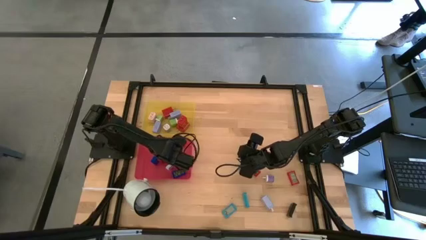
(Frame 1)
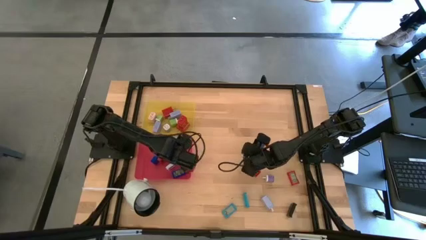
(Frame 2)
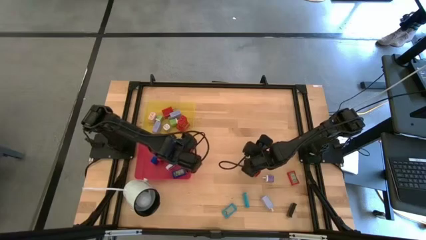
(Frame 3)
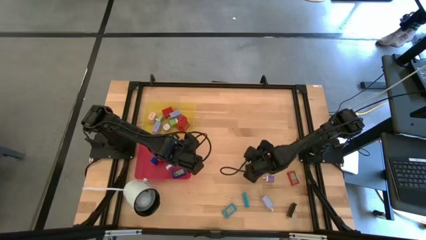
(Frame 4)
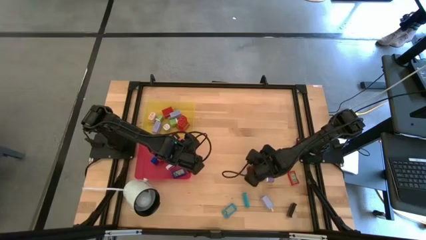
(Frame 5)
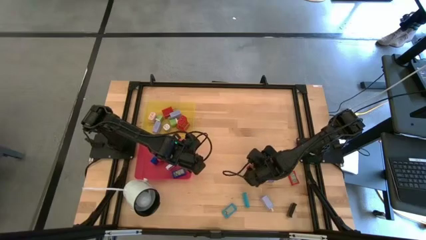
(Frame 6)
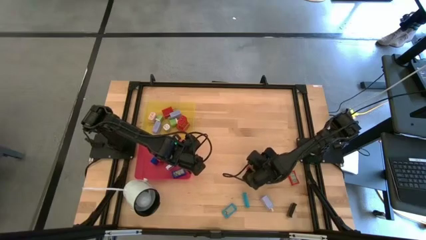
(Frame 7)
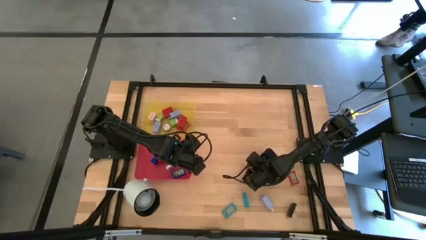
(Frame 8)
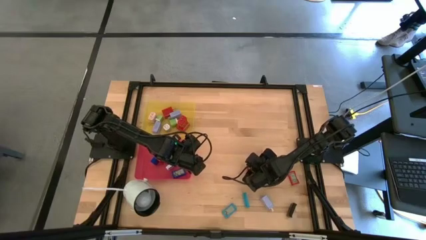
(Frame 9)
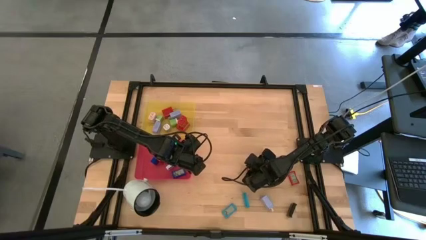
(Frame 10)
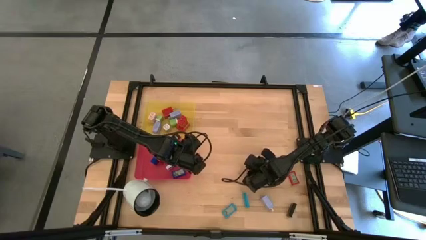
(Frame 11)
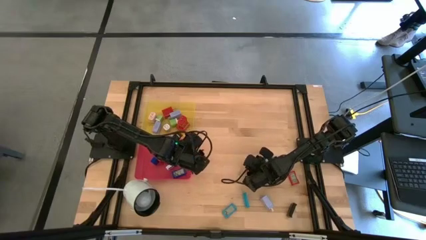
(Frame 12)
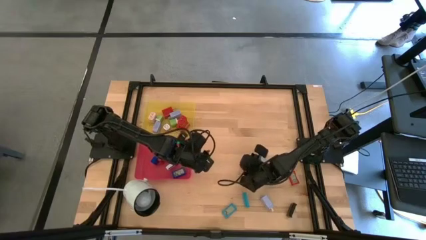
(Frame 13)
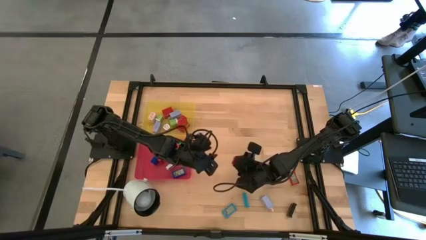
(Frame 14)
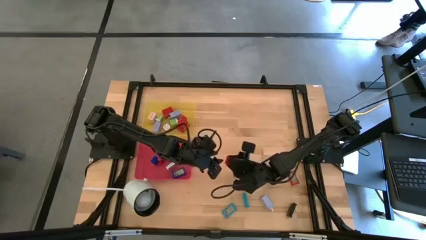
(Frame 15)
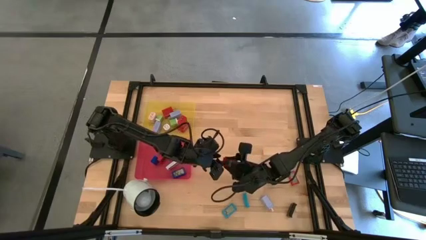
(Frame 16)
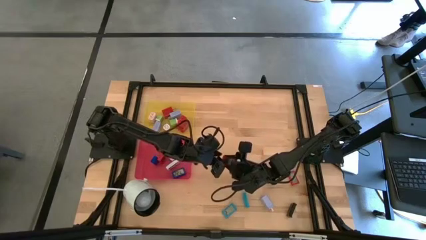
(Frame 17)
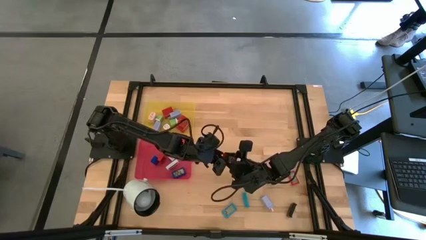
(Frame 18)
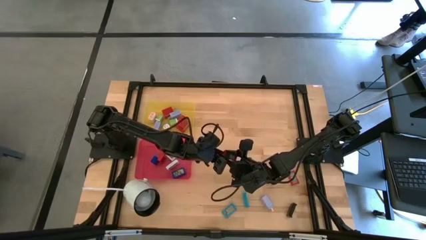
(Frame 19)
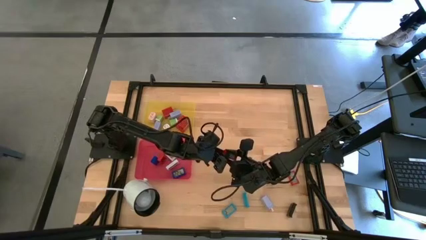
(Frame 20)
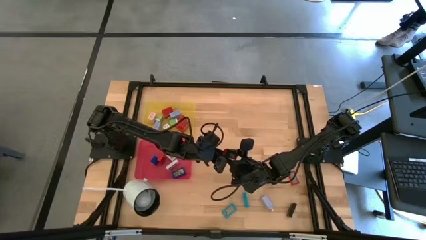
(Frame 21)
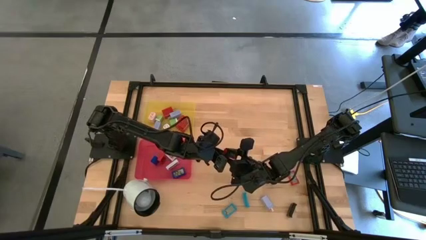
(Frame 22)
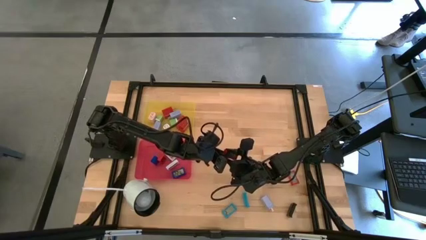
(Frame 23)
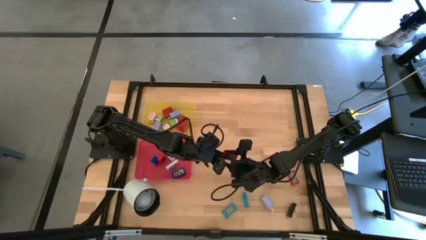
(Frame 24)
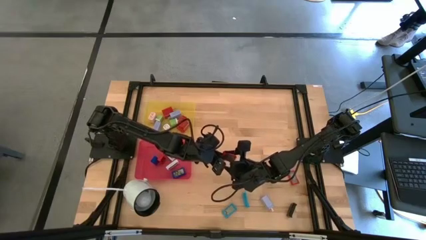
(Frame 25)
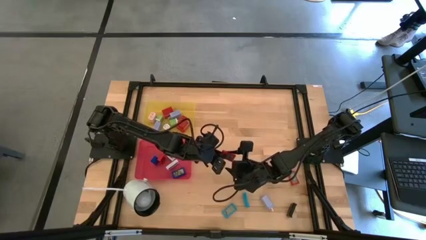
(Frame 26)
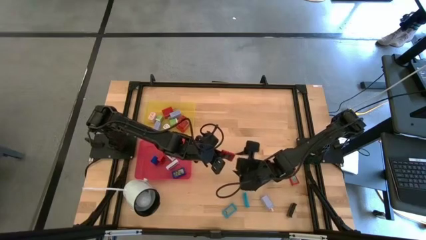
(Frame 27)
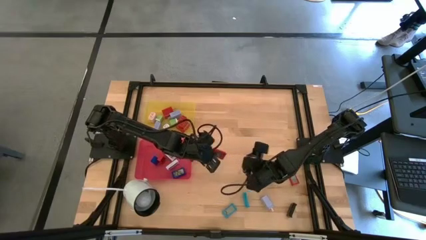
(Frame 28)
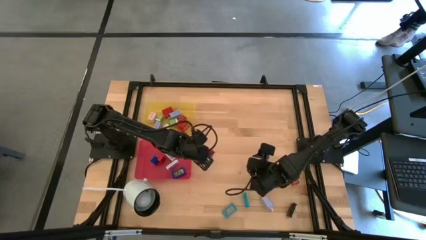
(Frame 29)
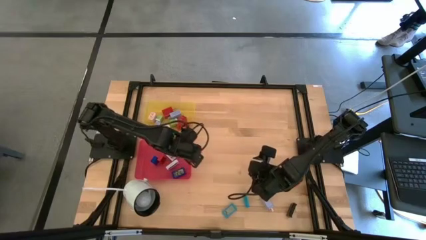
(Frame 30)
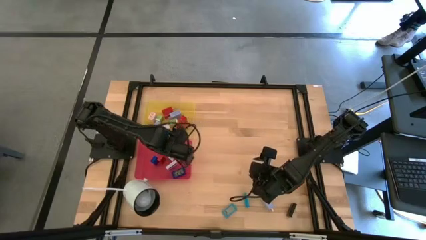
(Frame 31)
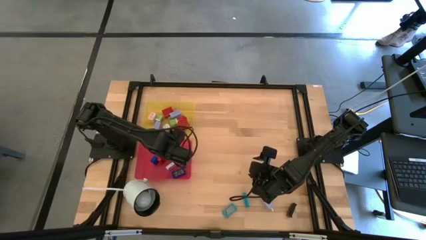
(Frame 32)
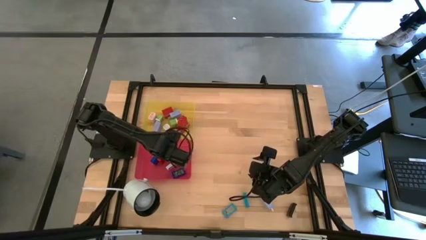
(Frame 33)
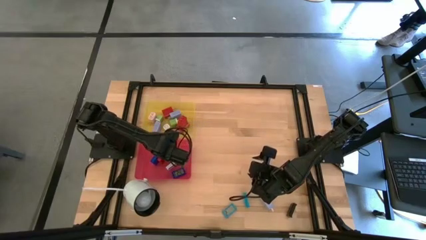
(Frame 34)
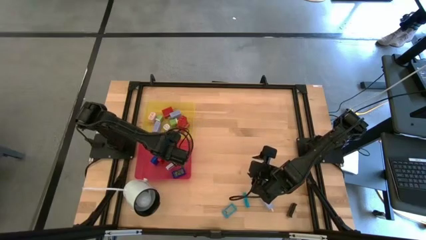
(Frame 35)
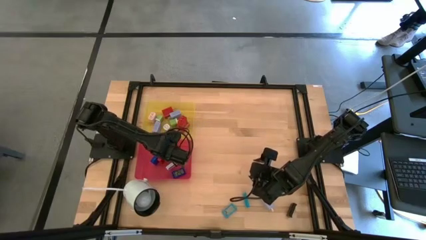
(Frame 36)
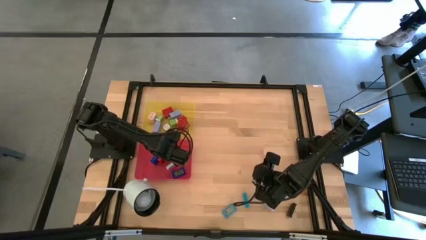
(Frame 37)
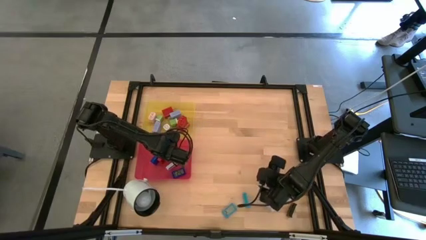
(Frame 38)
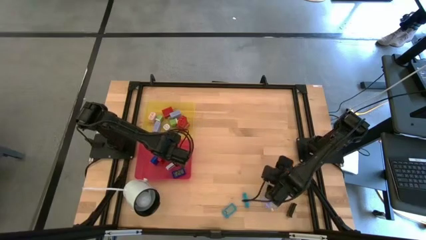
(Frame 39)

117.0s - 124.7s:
Task: Pick & Place Office items
Put the red timer into the red bin

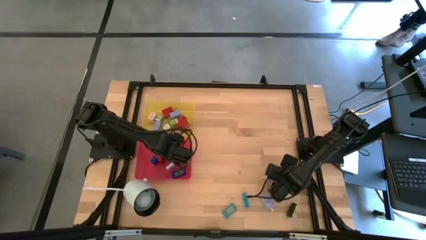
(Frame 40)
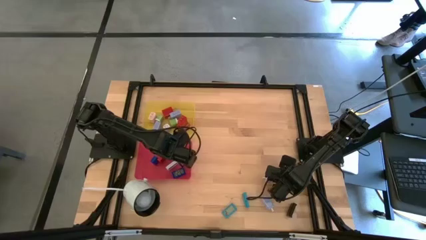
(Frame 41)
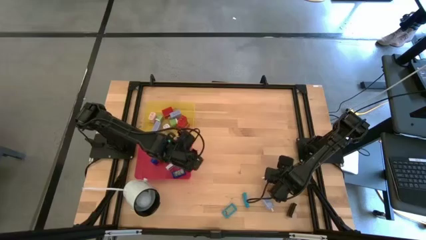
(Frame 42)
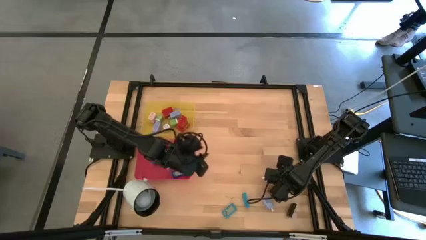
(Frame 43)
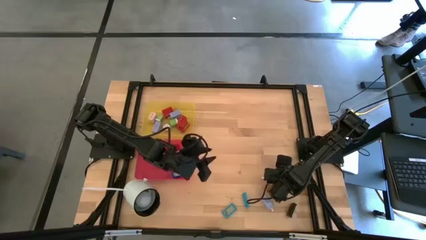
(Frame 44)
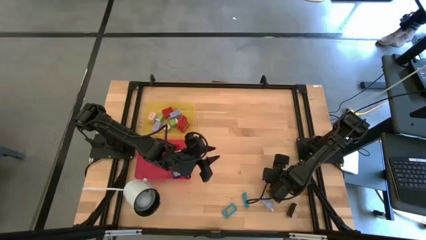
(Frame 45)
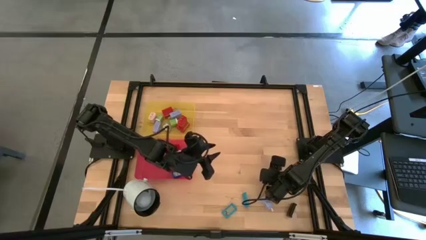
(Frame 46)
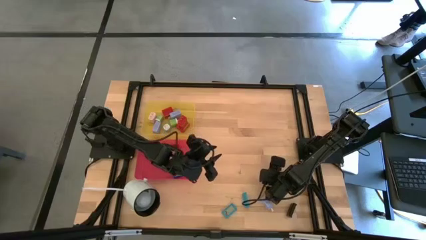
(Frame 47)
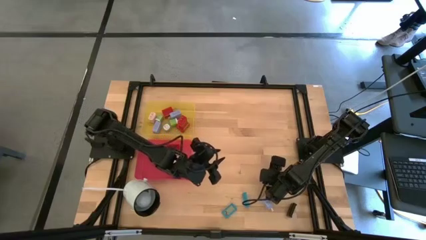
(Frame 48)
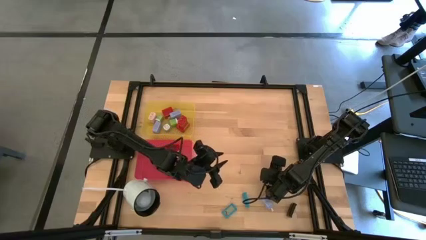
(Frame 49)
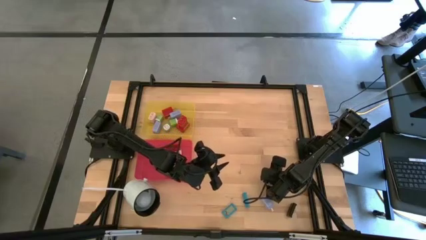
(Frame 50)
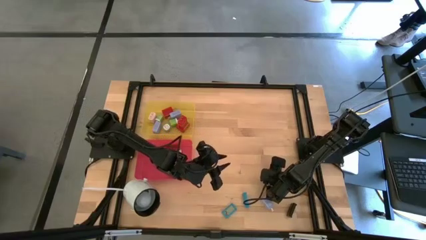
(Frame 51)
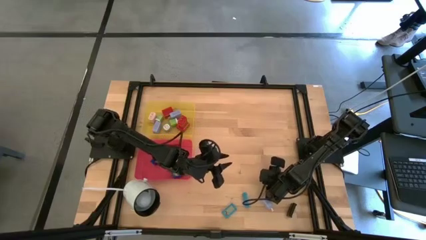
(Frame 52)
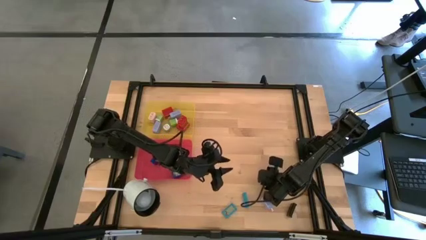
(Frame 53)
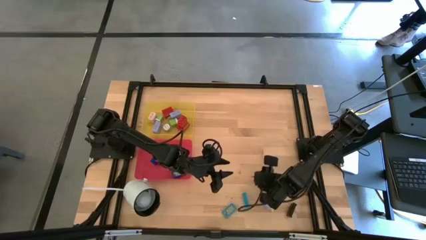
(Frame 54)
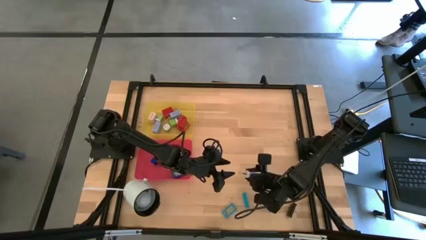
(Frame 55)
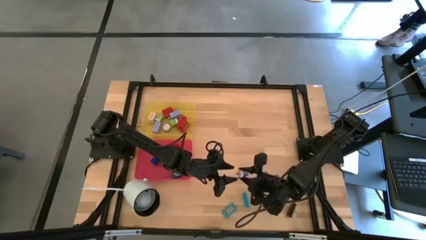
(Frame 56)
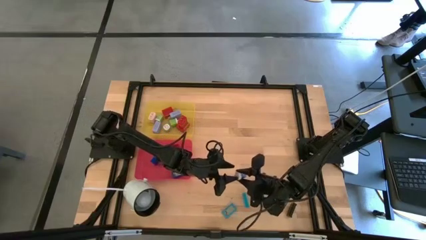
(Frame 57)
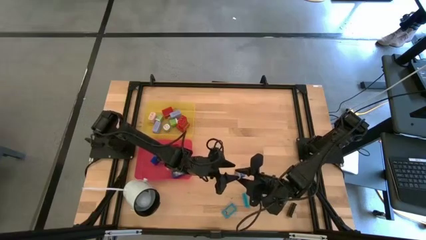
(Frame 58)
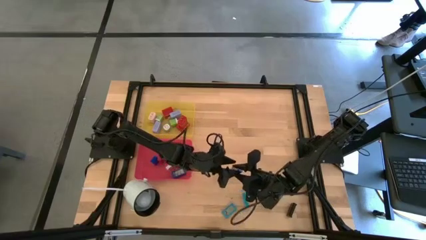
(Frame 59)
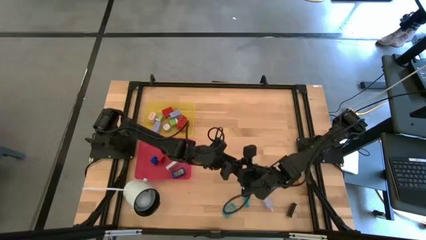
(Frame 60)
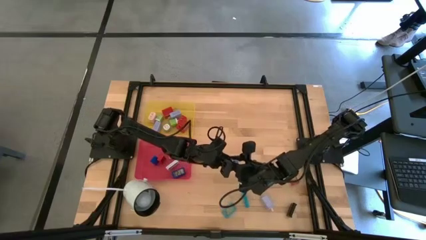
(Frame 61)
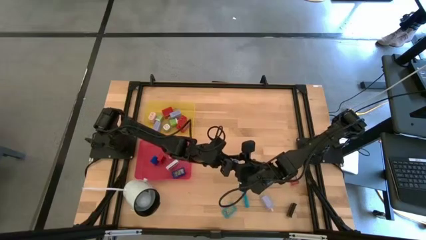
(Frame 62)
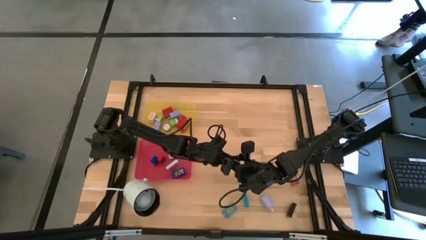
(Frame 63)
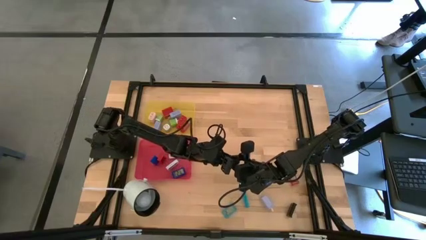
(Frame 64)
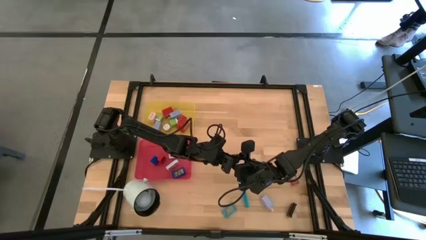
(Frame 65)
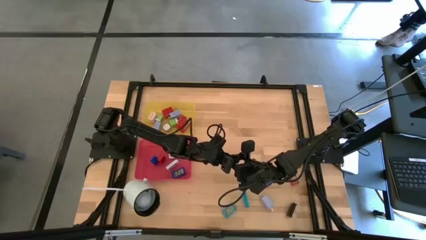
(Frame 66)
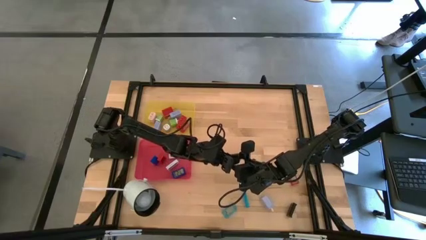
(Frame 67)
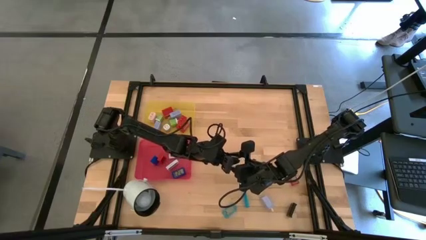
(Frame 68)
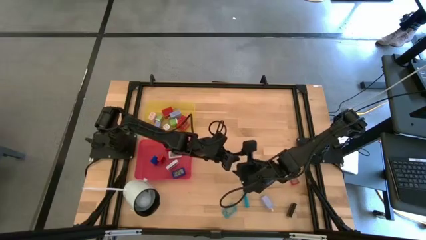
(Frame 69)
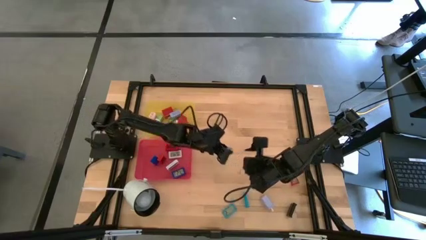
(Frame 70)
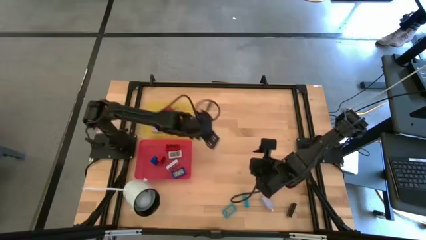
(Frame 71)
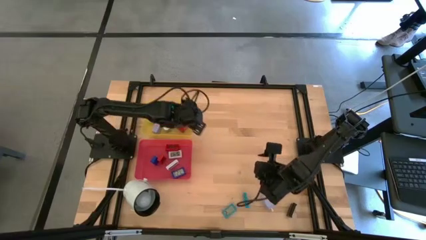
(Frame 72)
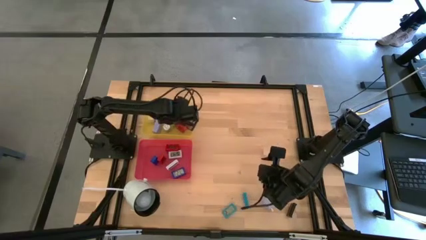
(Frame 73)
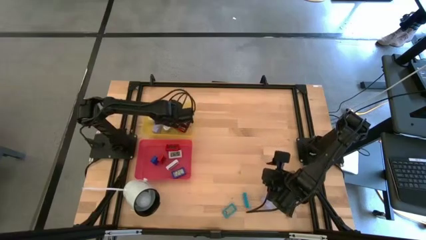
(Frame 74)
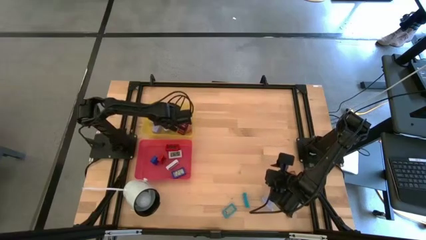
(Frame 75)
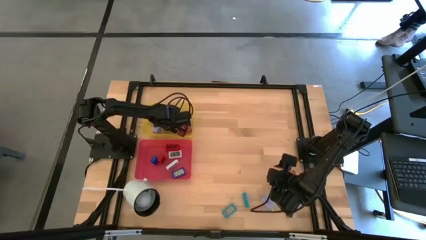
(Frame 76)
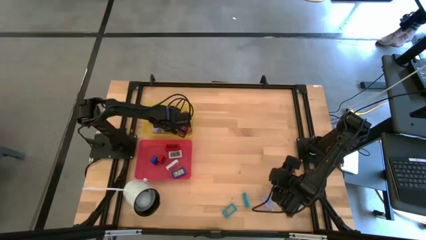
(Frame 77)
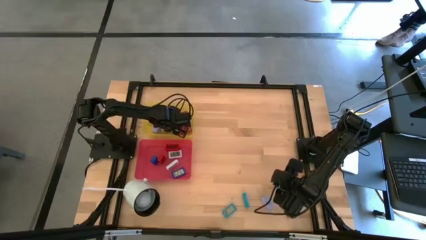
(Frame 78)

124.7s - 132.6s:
Put the violet charger adapter into the yellow bin
